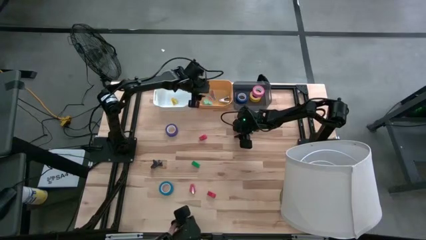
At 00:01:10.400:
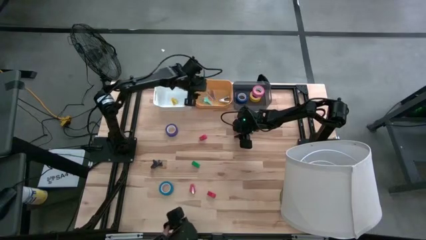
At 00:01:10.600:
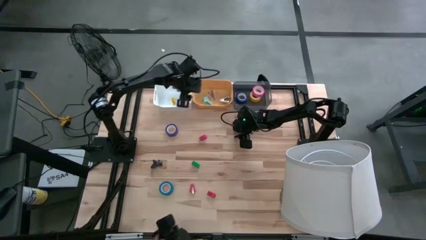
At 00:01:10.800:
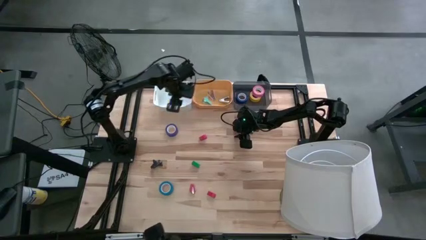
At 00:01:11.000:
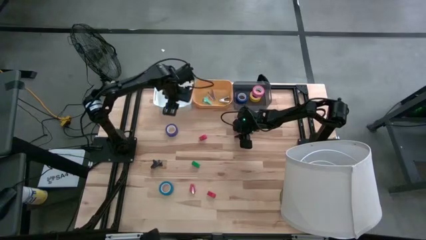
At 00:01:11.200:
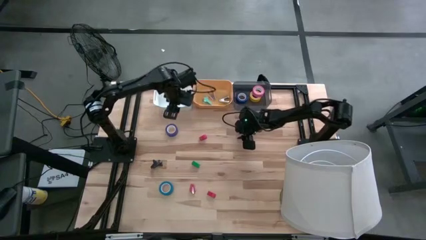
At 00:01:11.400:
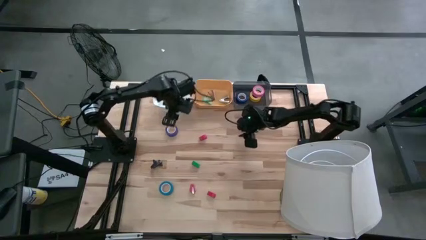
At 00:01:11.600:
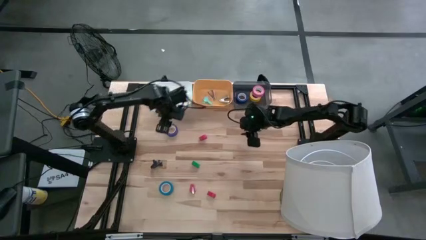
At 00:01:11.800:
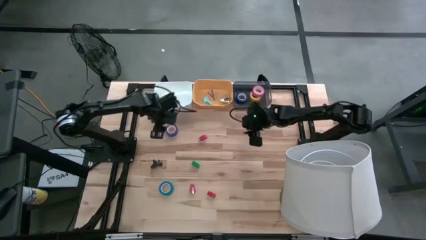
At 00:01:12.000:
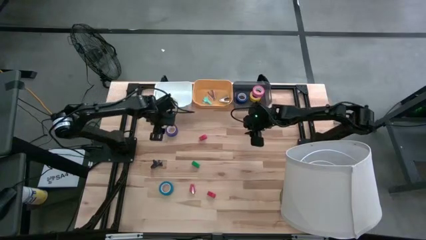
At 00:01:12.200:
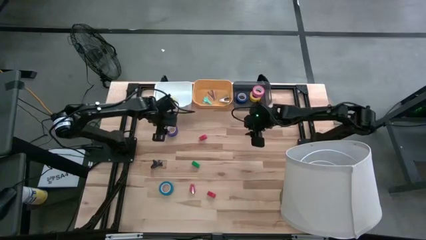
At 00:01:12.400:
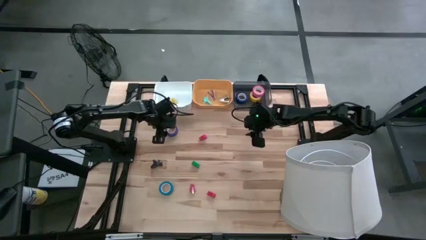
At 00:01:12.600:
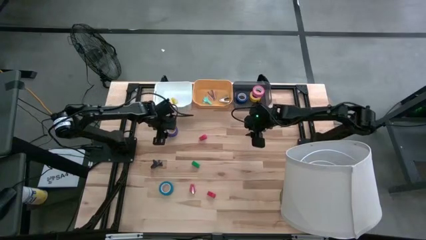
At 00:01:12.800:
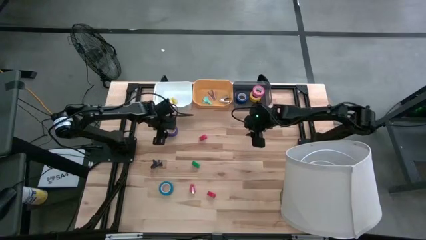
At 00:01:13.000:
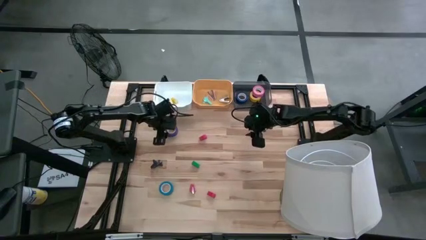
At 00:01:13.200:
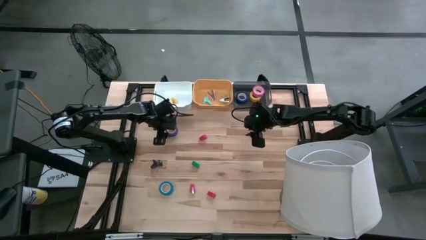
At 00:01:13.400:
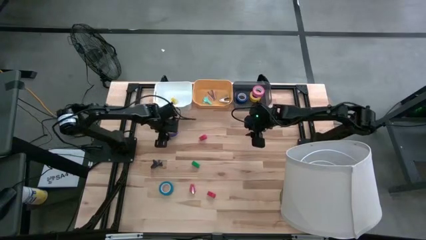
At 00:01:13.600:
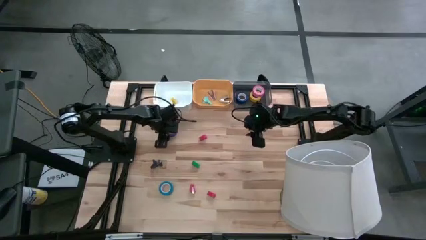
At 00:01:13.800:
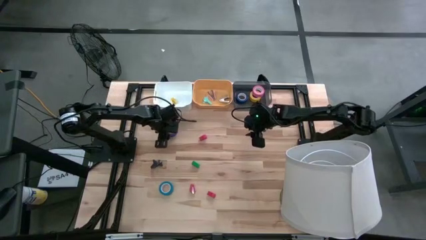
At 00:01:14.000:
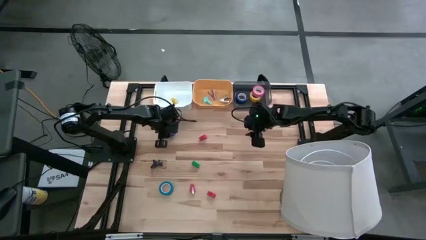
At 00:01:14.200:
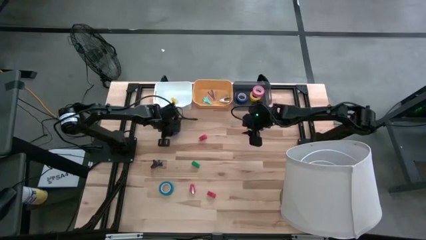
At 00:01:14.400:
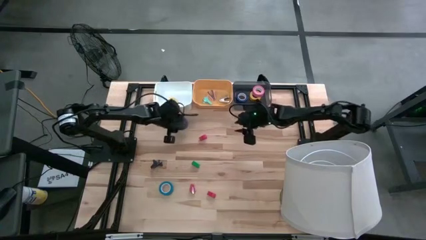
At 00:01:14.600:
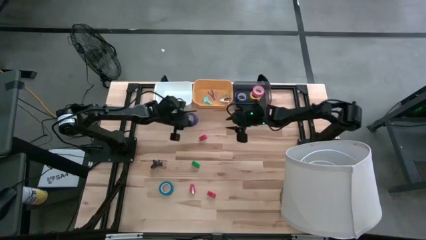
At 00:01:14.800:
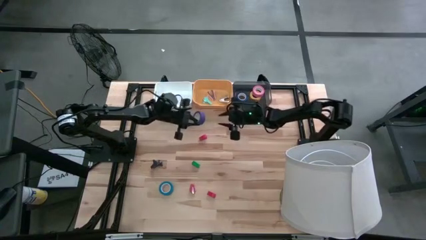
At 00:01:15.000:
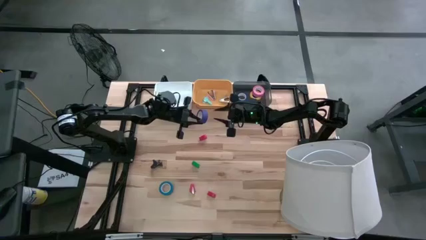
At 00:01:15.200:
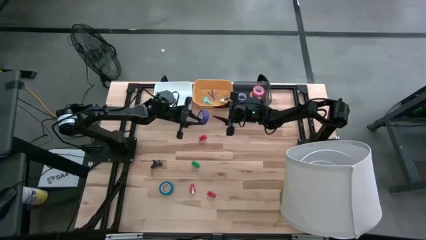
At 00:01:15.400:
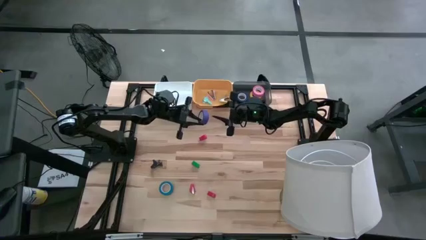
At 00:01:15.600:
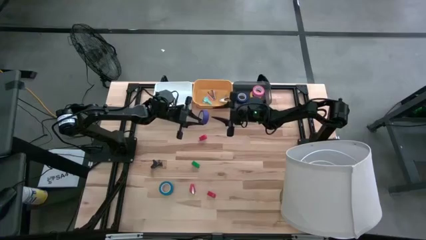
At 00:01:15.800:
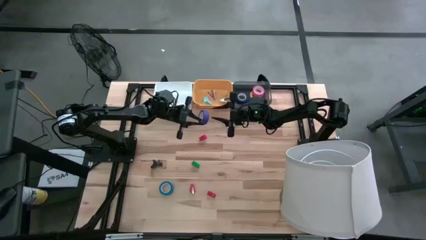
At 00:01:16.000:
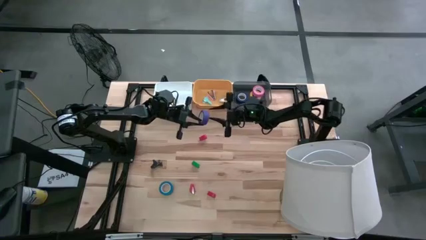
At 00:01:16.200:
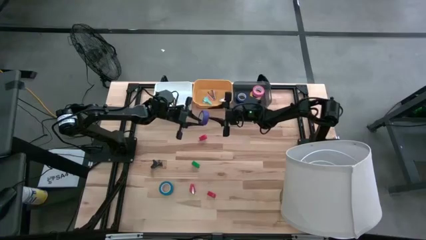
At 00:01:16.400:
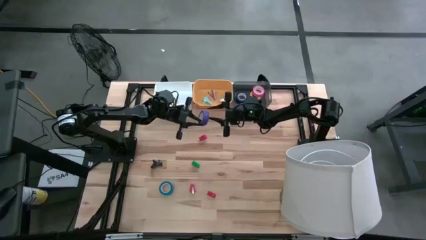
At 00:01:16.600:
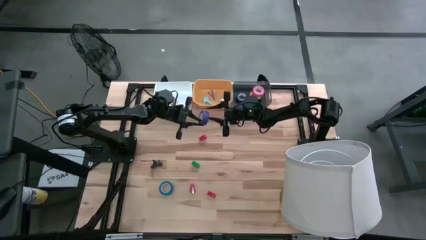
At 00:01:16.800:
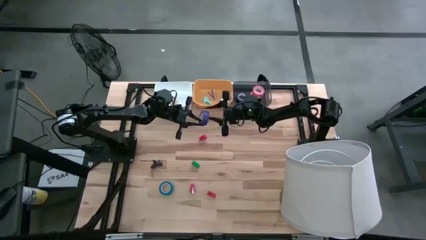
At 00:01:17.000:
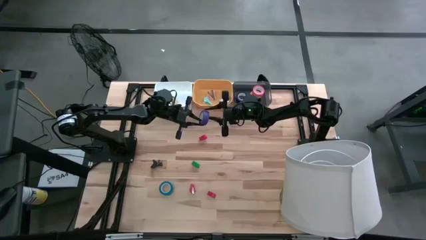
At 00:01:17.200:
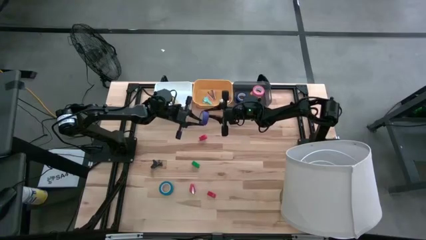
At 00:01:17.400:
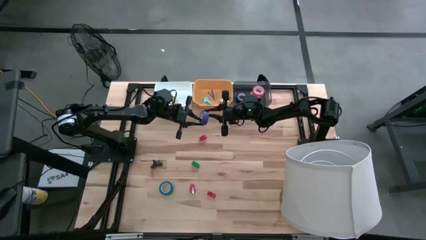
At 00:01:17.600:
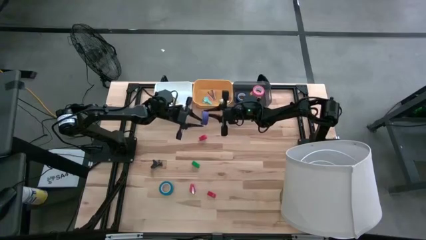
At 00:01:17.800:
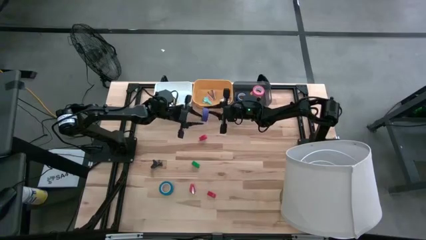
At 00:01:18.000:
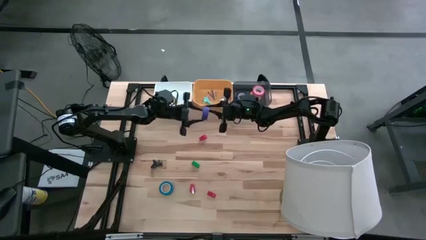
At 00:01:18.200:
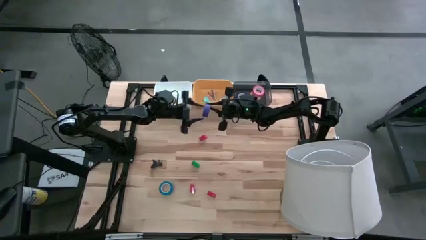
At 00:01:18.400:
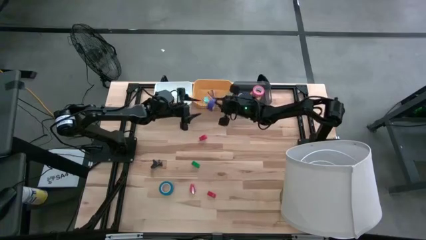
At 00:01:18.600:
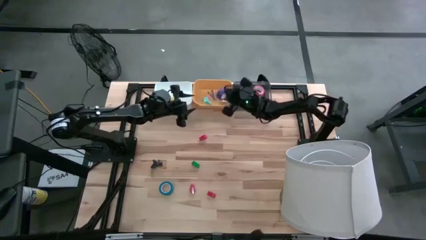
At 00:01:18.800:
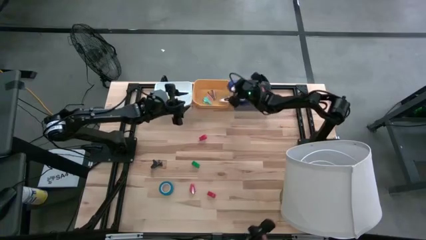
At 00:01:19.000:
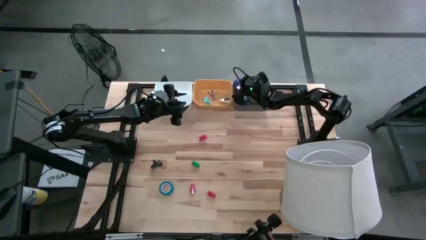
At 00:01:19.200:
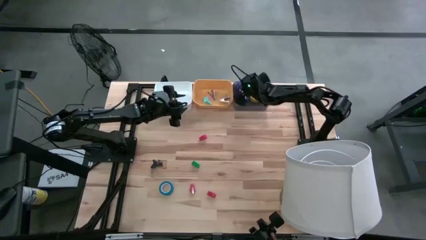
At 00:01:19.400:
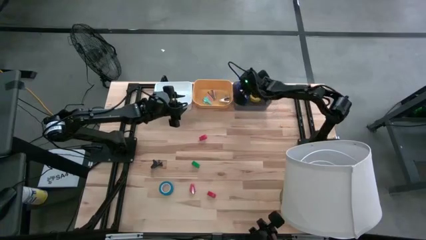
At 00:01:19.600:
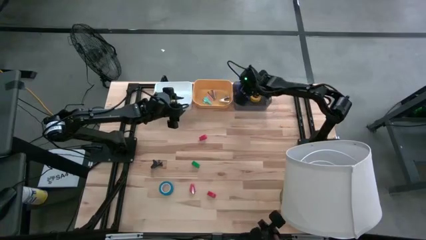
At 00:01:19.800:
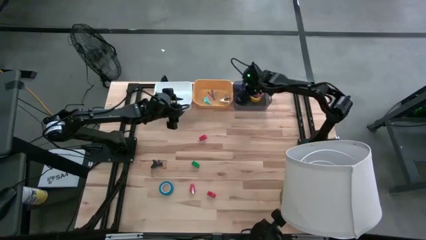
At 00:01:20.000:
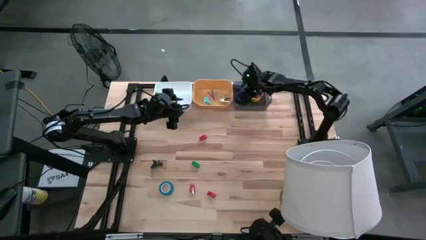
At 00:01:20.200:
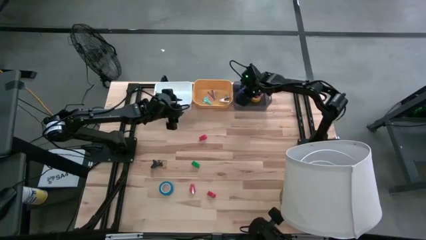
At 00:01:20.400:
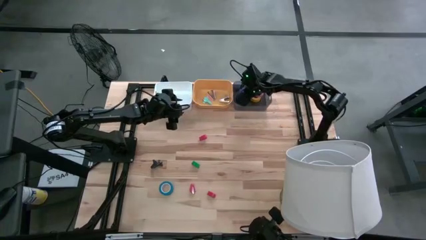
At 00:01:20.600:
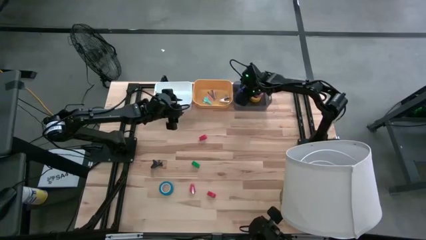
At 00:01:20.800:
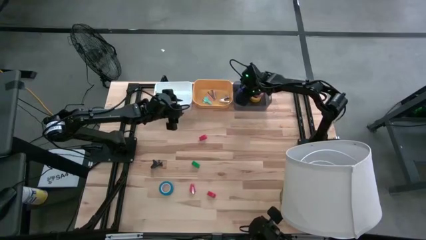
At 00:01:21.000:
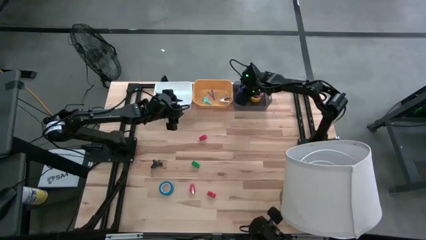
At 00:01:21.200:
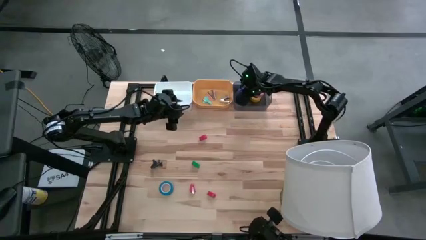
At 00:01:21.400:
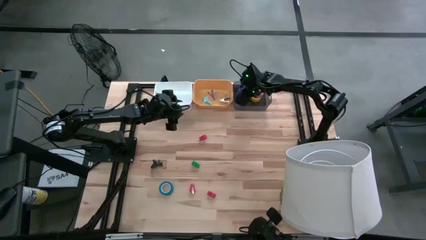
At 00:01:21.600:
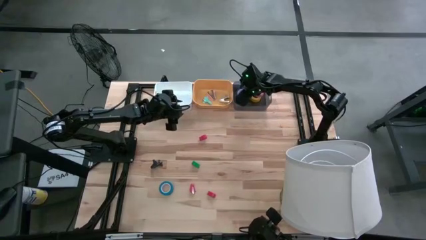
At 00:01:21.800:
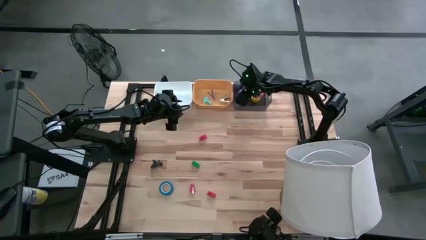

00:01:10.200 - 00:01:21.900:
Task: Pick and place Stapler, Stapler remover, tape
Put the purple tape into the gray bin
